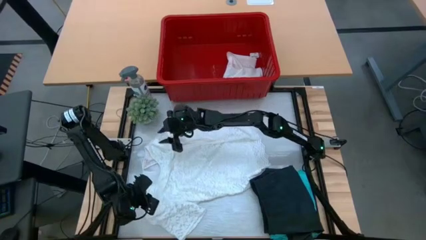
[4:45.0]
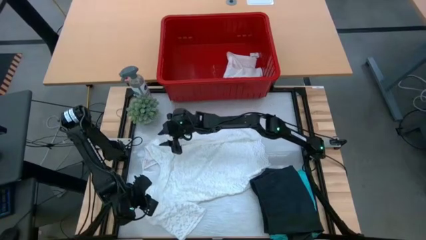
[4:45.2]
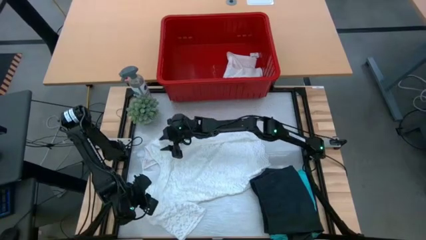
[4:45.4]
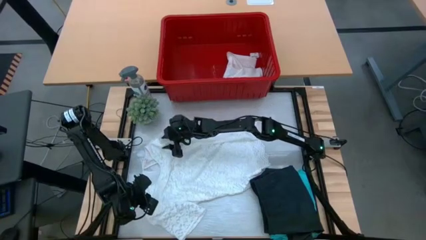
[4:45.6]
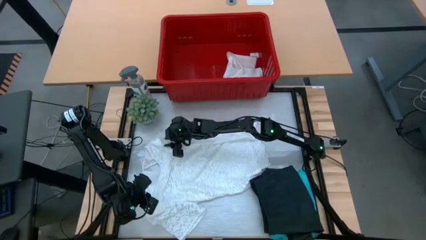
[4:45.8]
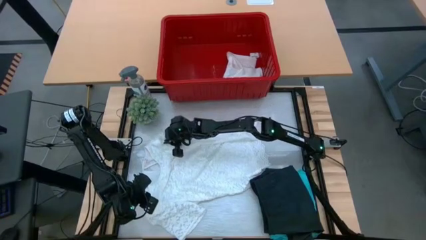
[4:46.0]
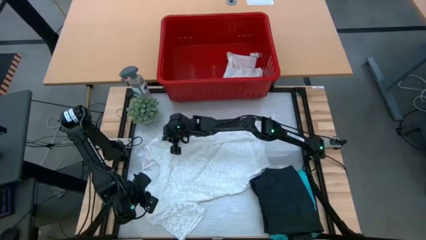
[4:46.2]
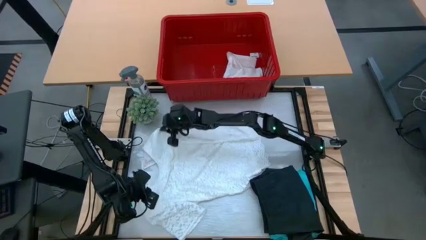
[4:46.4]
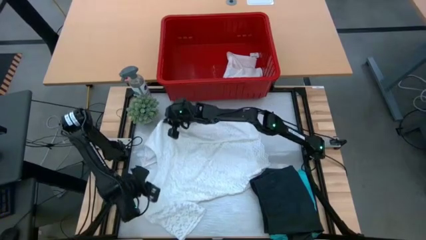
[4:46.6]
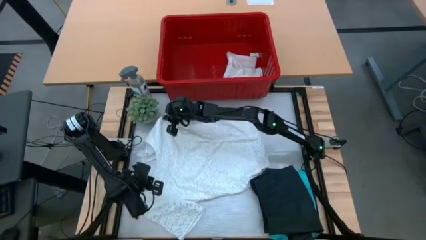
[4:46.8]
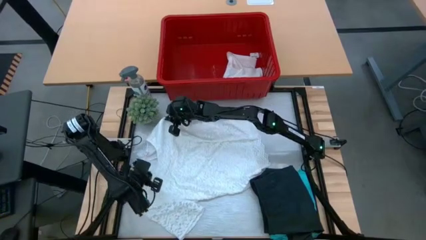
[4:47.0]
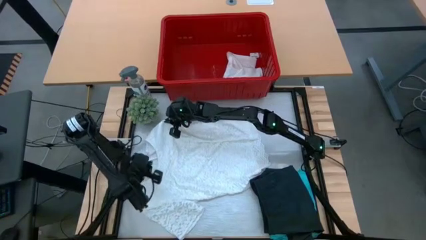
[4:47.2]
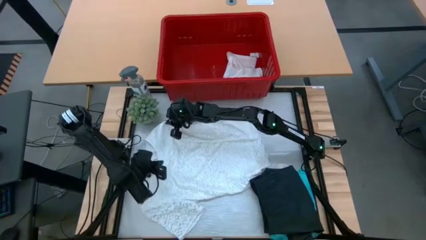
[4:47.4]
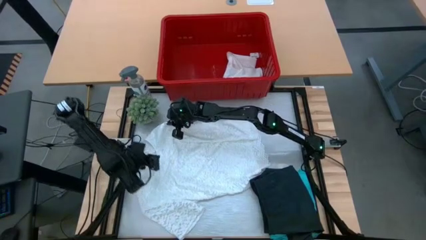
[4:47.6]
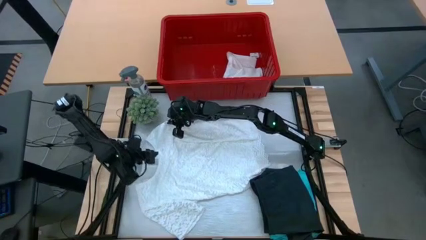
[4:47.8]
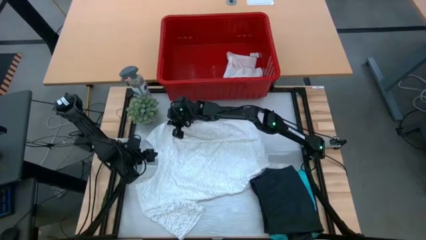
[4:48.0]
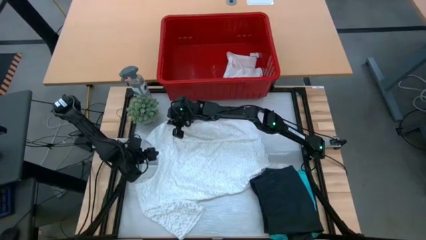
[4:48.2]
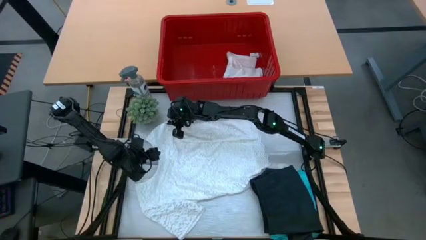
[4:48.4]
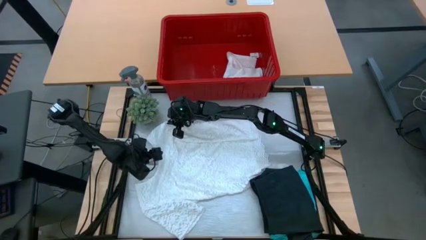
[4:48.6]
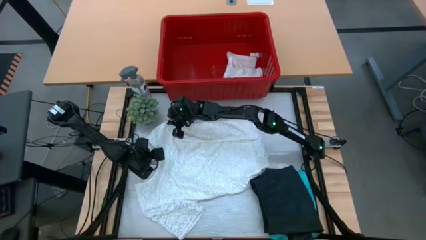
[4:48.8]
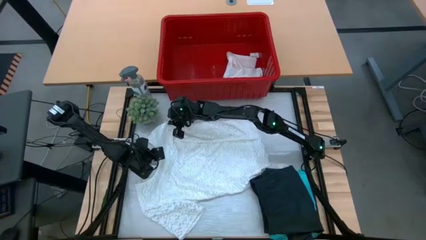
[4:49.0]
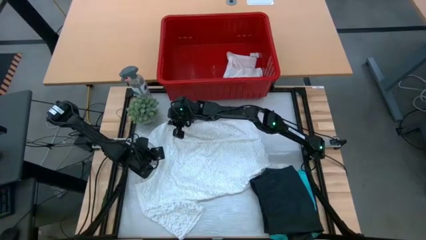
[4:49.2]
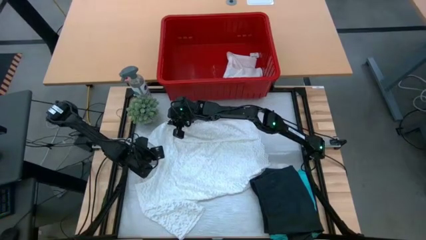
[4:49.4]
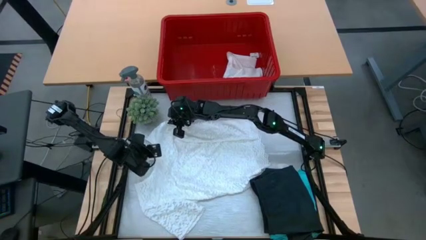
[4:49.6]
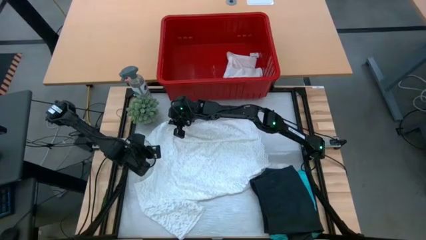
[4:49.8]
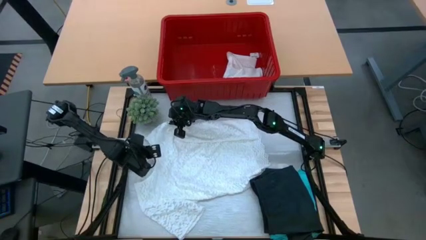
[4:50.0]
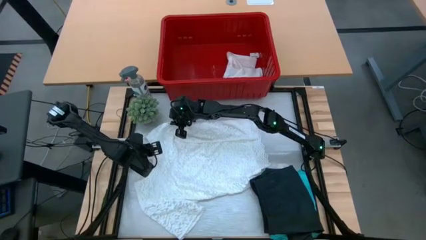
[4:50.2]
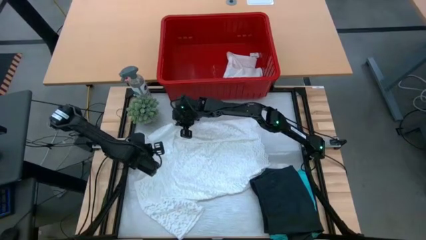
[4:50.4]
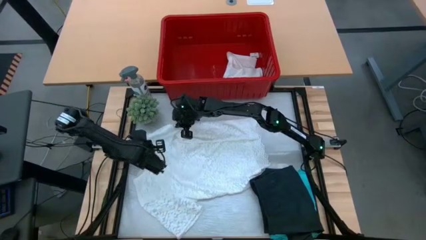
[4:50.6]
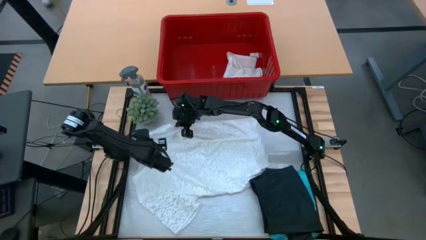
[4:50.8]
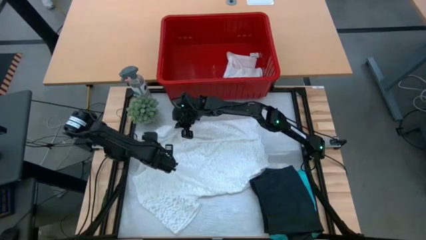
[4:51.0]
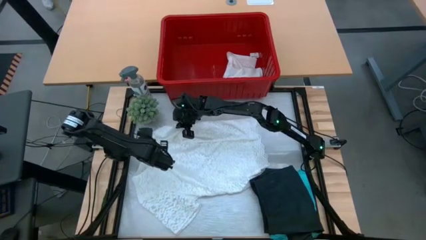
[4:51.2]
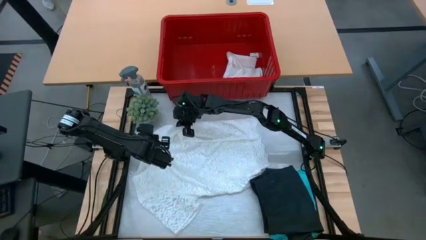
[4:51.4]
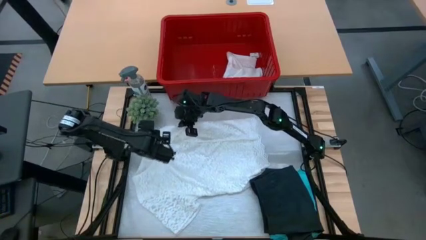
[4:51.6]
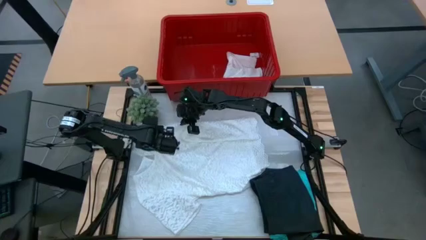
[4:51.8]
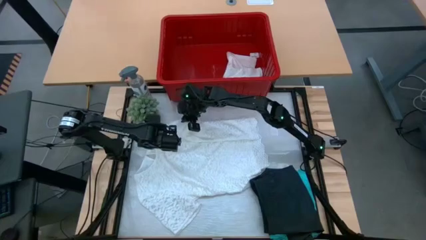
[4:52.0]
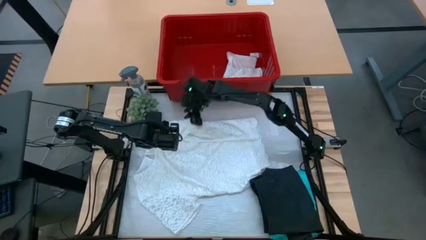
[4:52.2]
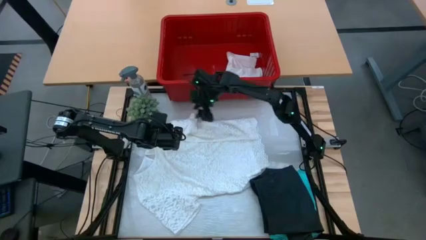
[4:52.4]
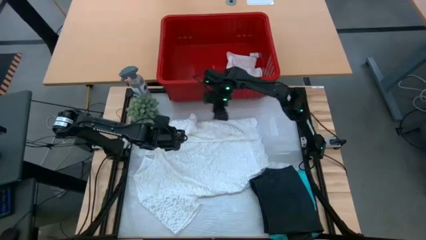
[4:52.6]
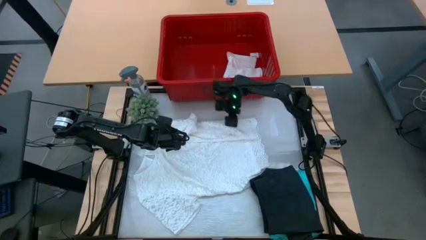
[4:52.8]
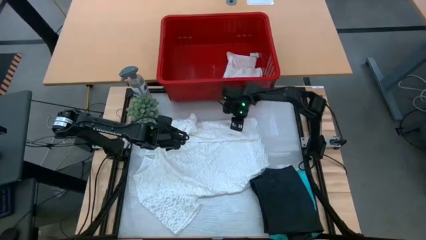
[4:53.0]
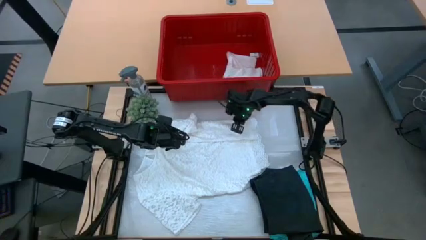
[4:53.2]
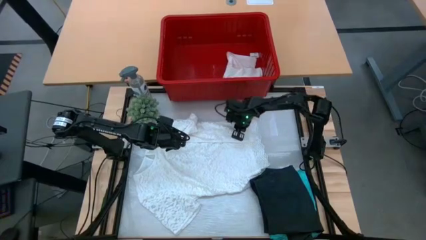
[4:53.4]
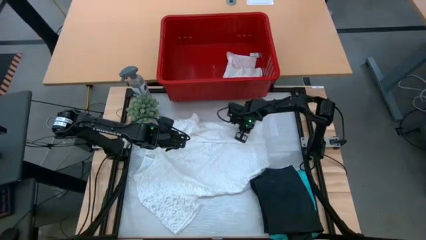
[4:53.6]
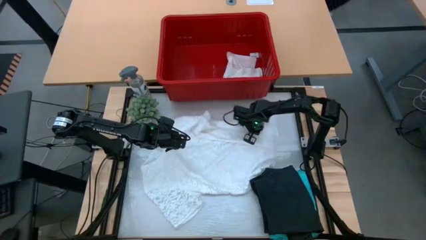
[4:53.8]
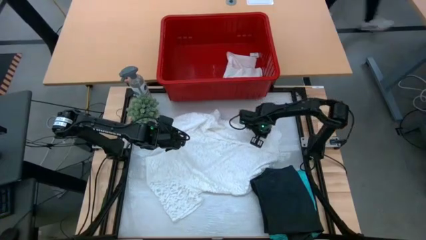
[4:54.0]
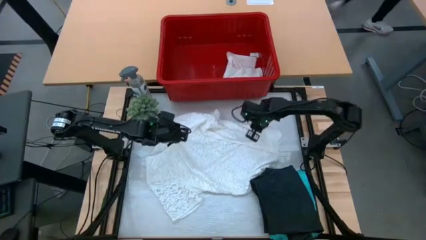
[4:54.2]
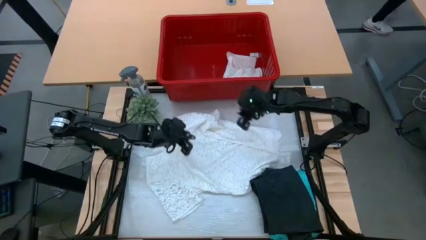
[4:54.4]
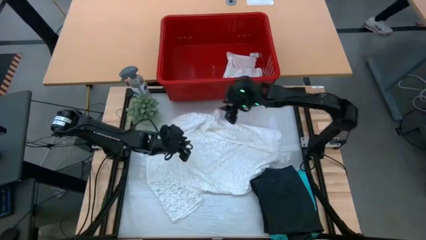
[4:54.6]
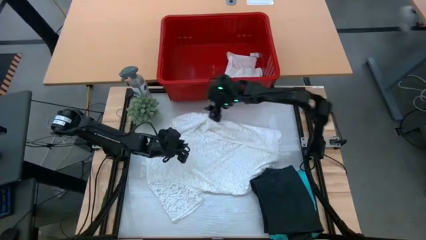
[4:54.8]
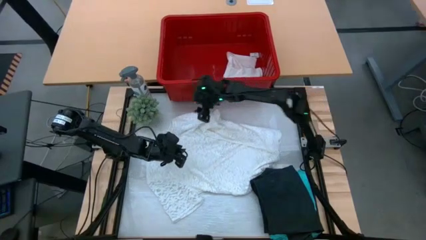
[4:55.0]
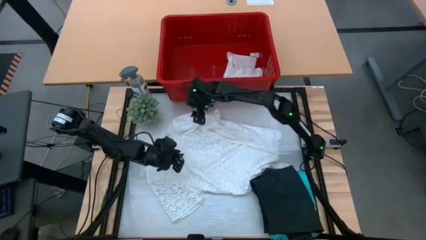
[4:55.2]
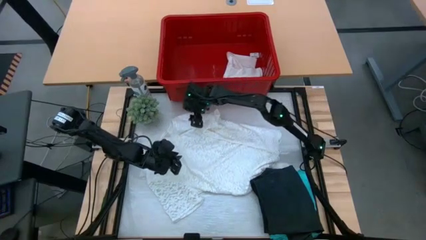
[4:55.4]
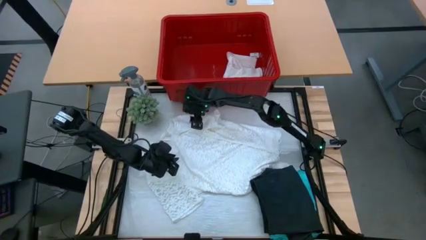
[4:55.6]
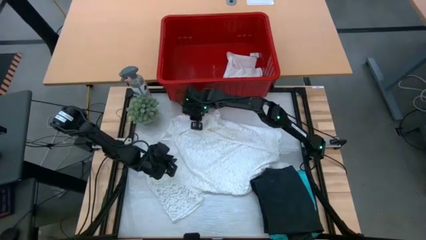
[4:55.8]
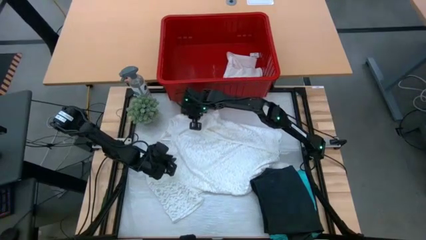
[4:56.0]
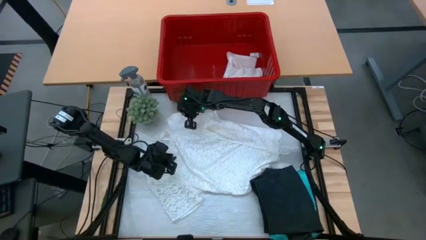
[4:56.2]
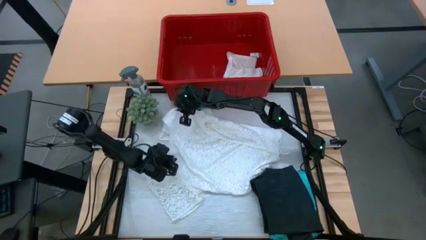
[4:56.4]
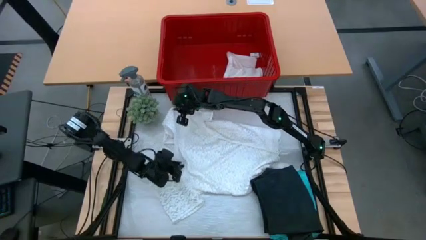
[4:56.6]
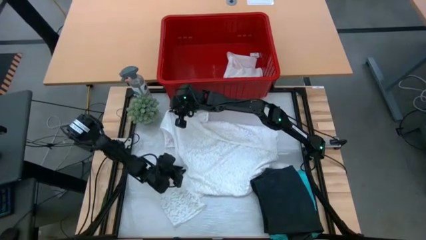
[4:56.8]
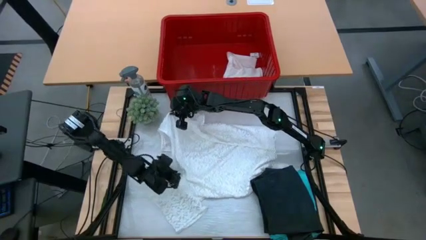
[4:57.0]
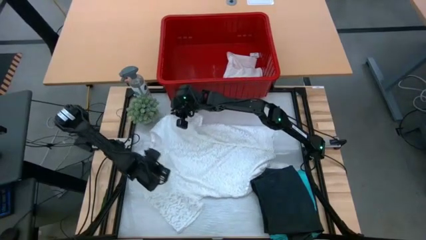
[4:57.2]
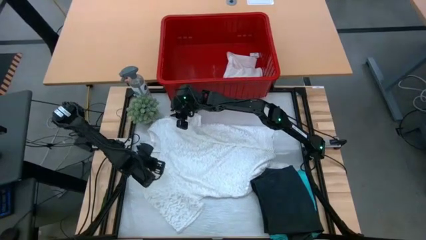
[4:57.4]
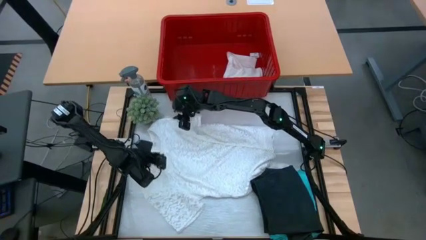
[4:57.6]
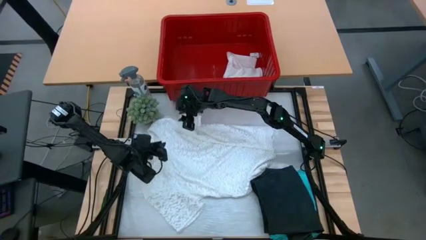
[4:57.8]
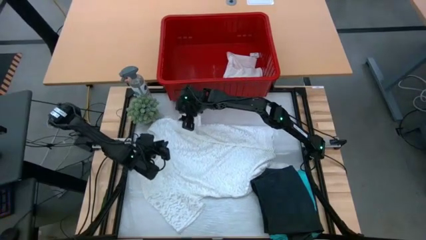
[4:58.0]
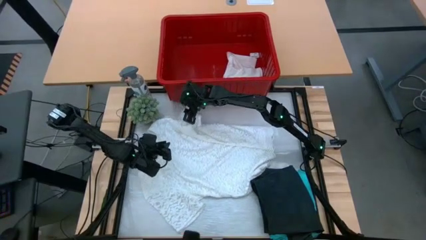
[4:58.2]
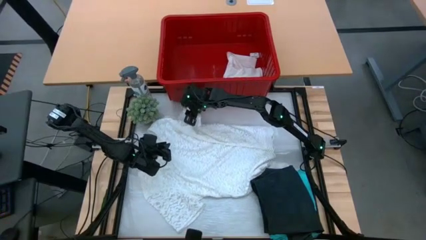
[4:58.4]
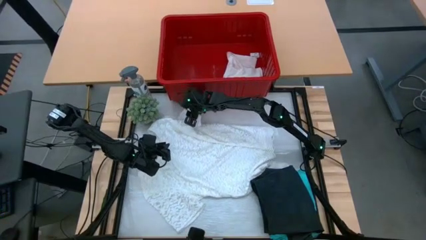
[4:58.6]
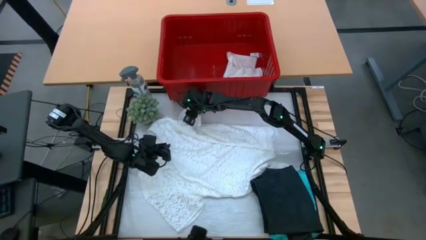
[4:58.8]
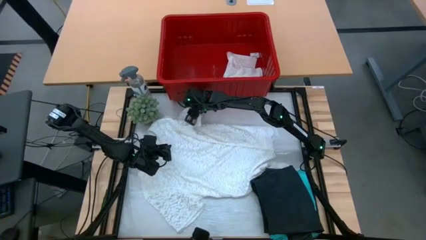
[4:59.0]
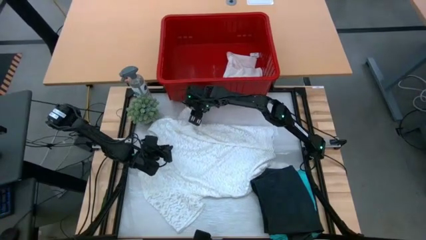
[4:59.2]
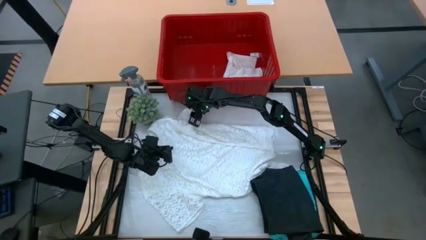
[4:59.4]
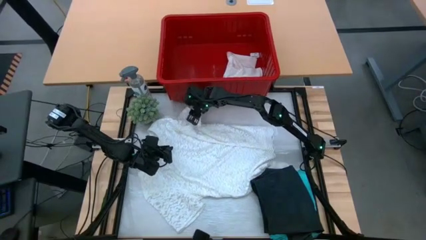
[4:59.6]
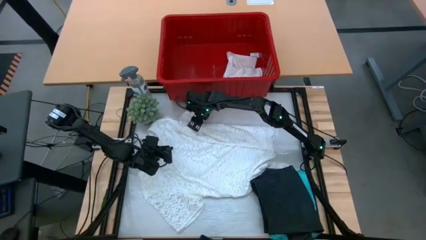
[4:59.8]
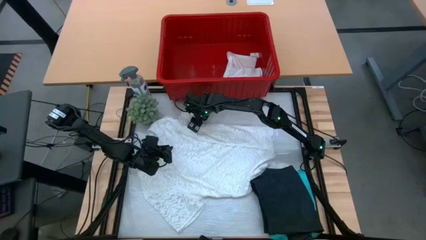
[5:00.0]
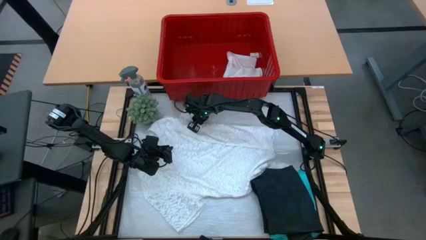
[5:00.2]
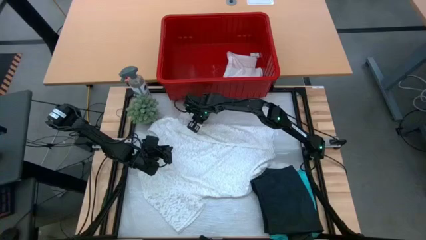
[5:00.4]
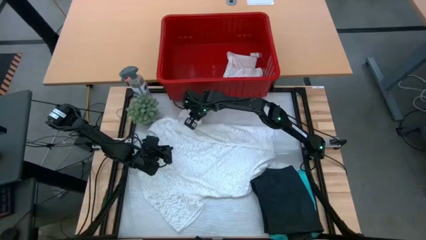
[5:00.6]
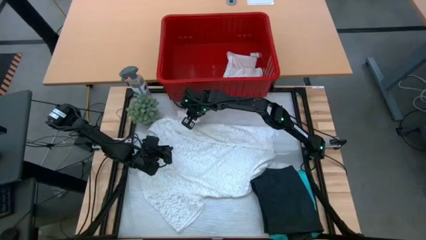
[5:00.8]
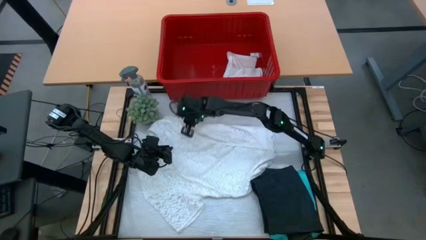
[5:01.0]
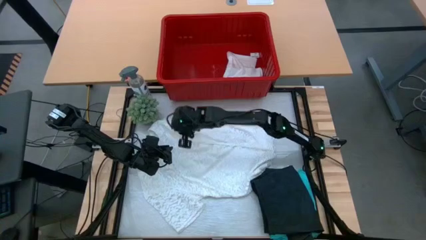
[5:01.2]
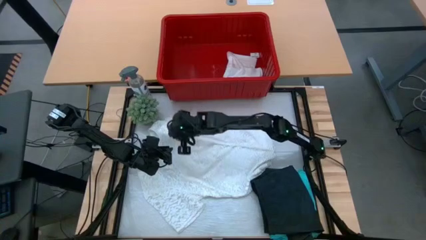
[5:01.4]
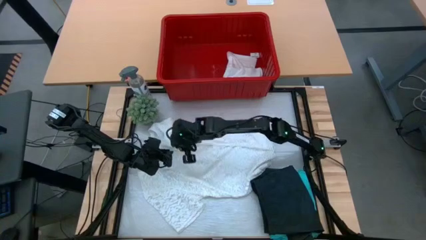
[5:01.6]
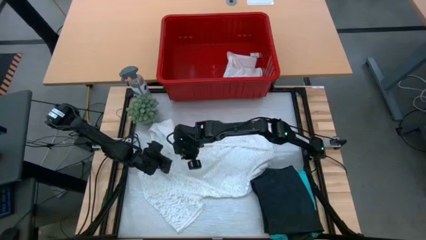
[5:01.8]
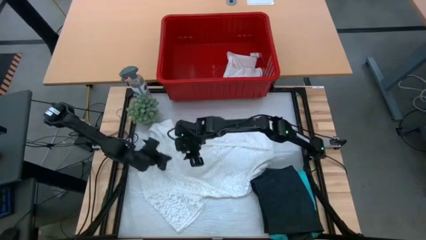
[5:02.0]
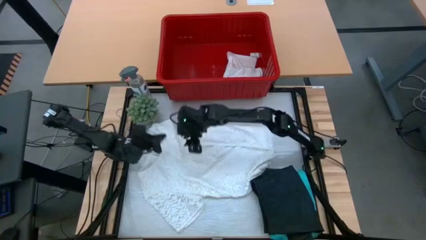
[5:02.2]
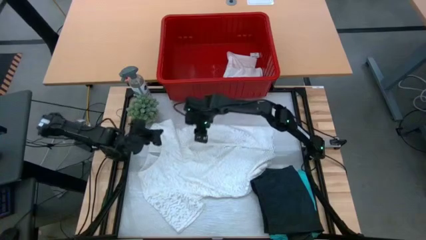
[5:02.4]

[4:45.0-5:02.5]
Task: Fold Laundry from Bin
Fold the white t-shirt
